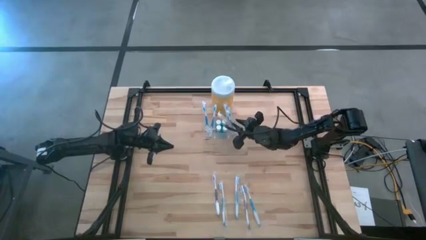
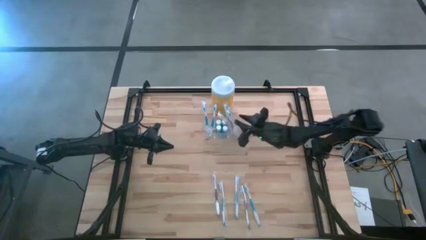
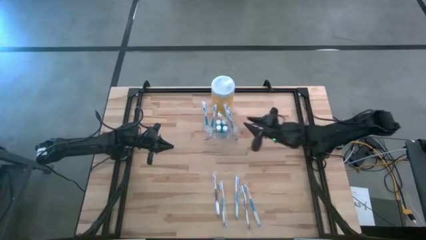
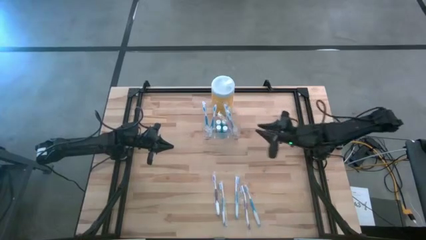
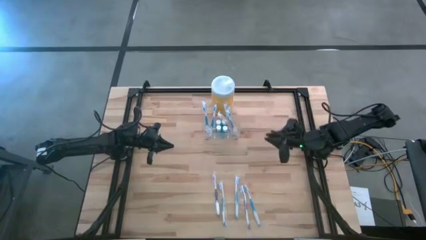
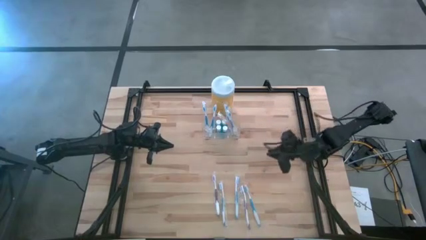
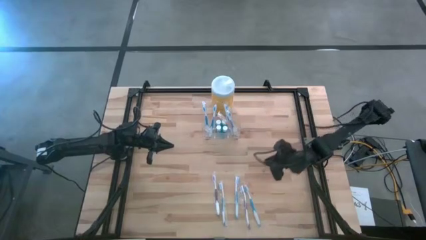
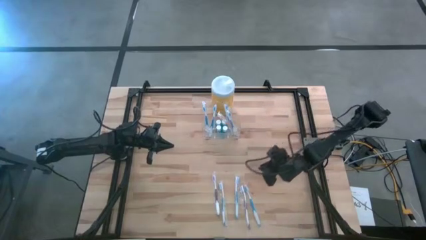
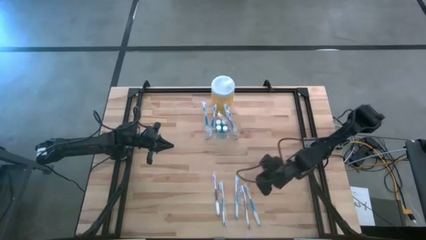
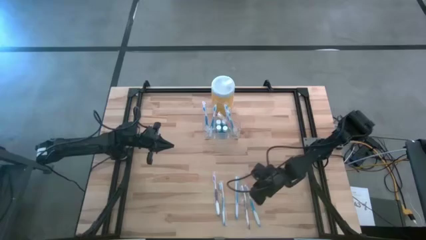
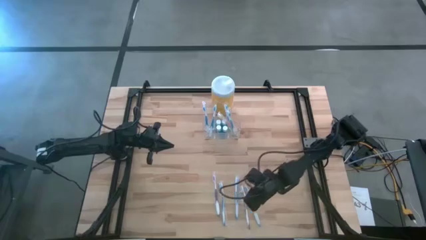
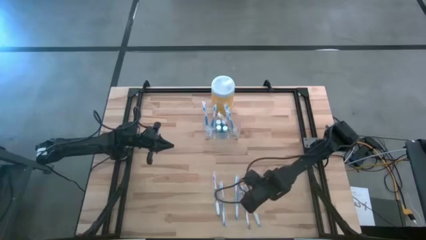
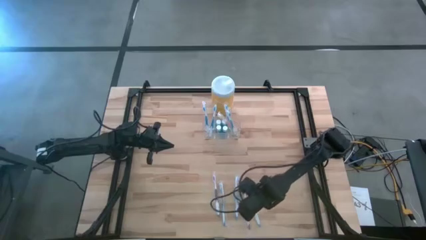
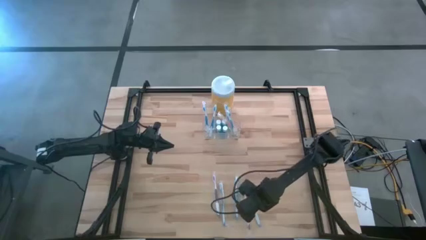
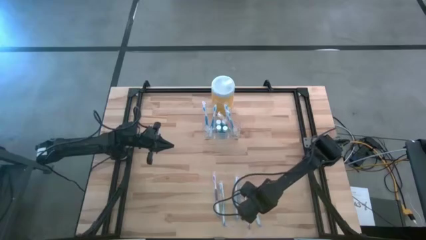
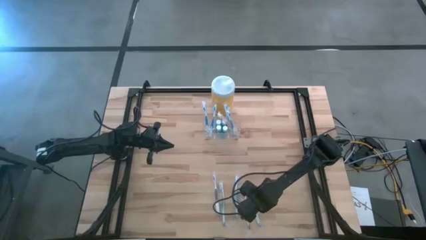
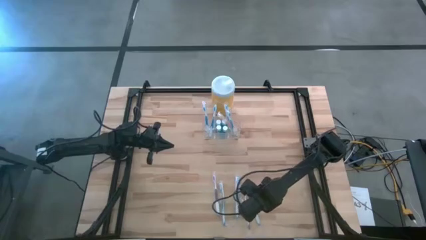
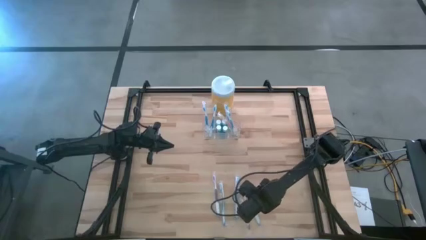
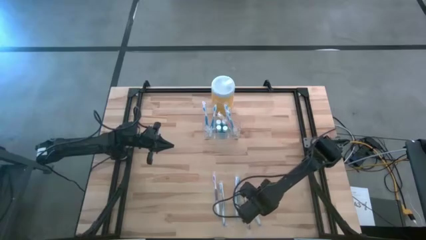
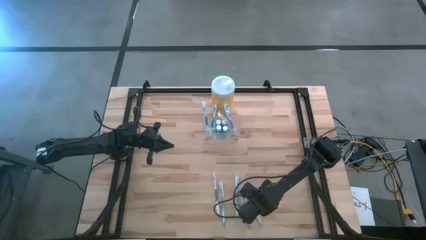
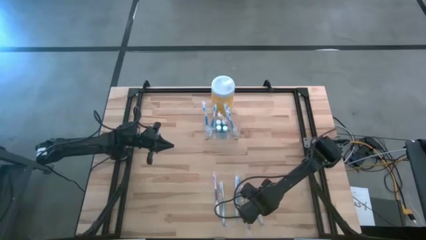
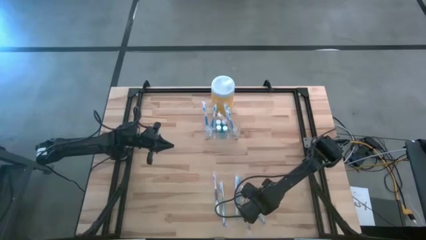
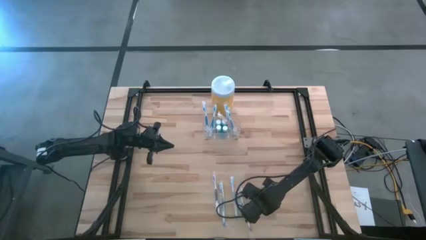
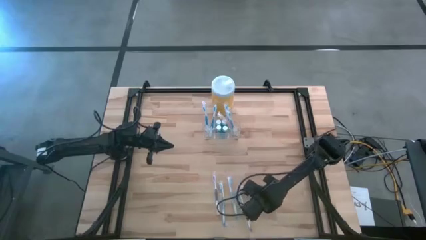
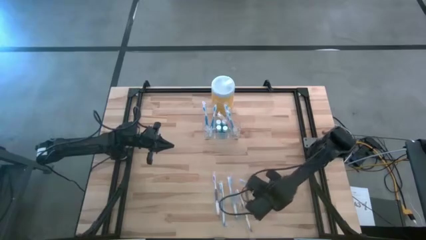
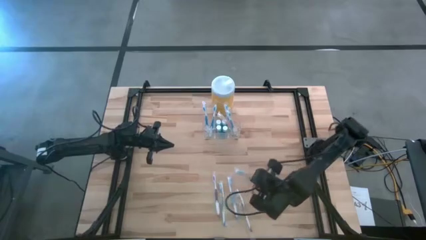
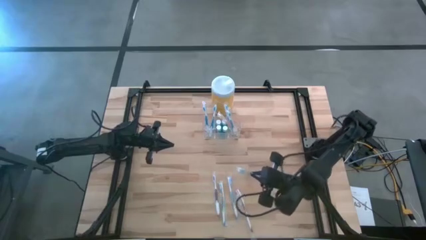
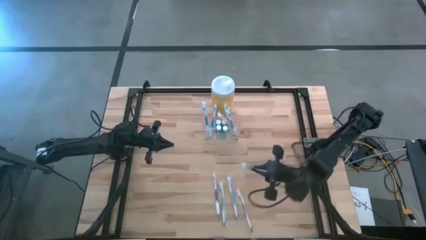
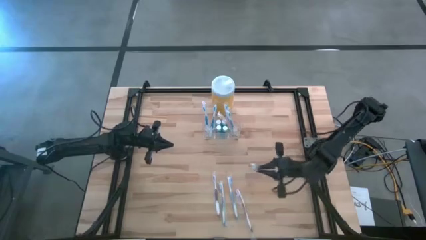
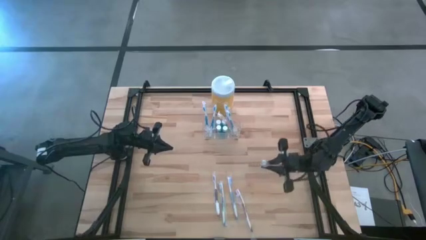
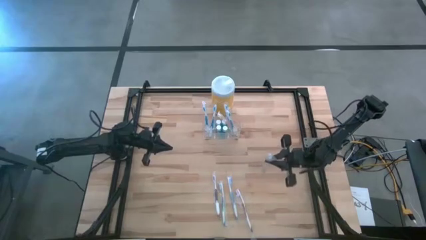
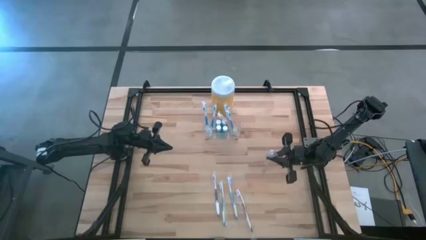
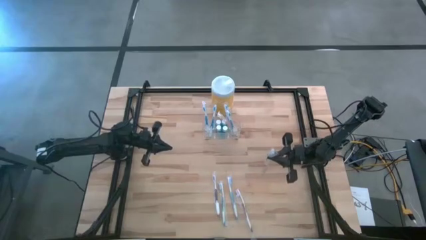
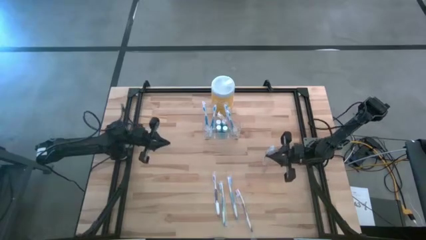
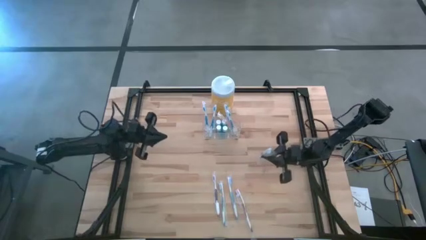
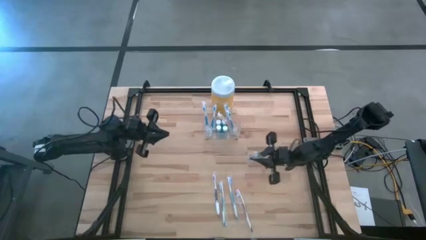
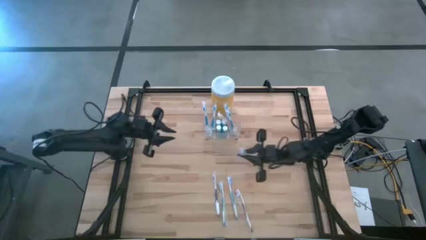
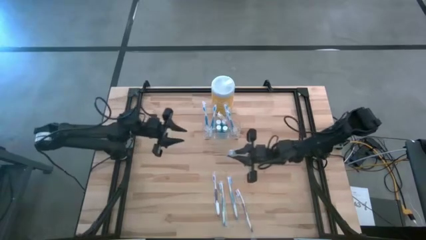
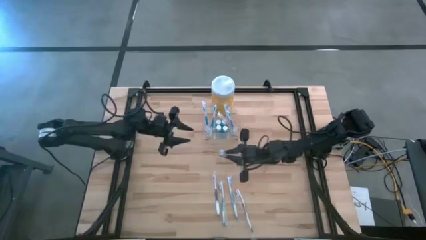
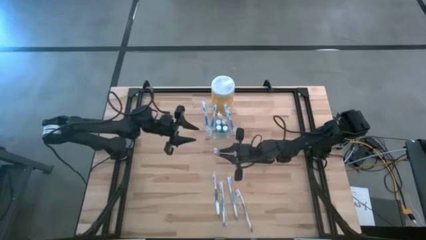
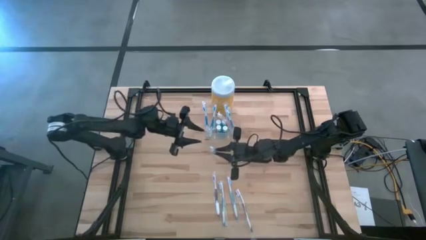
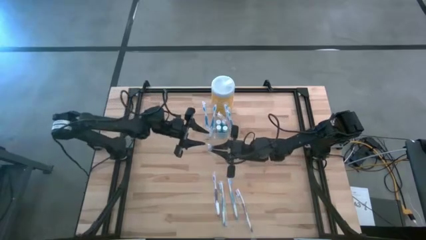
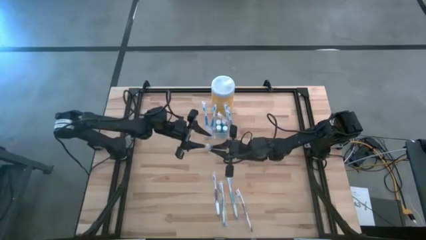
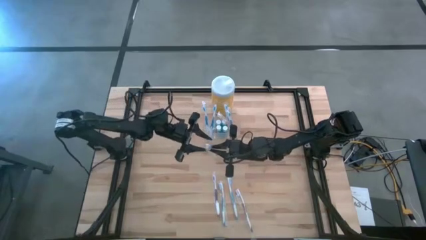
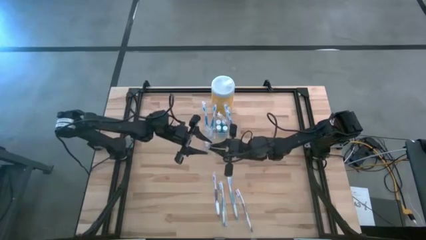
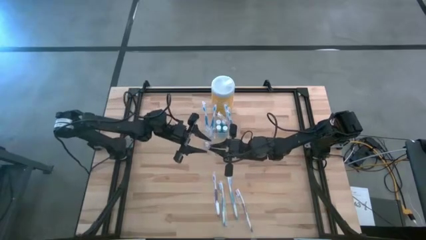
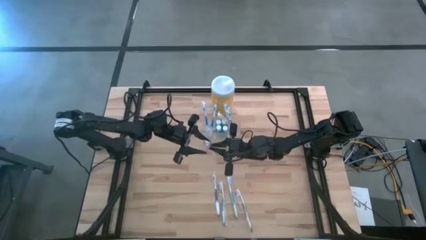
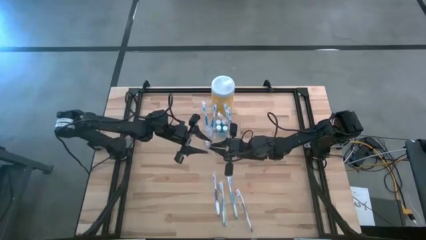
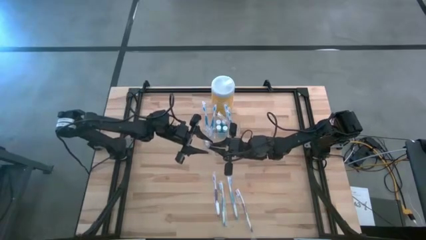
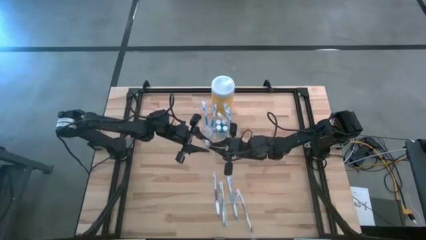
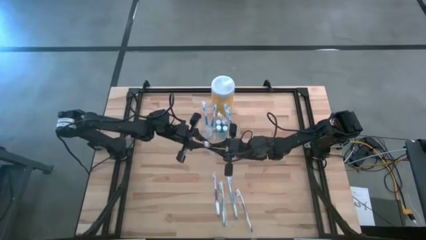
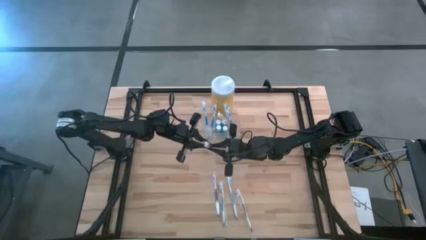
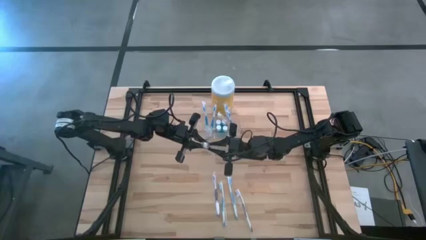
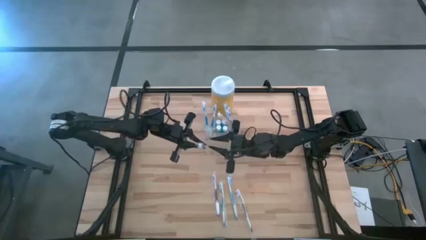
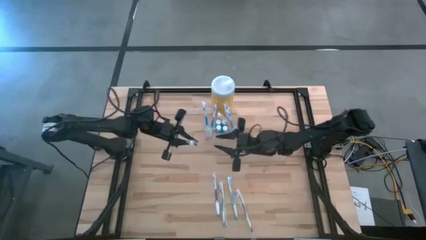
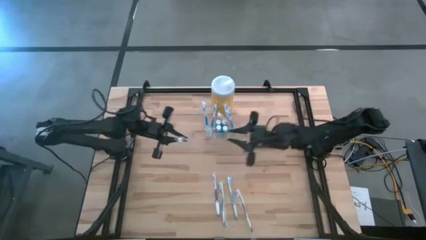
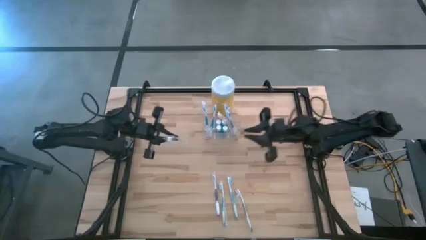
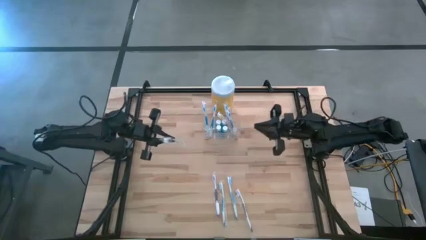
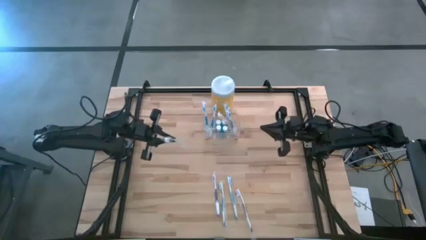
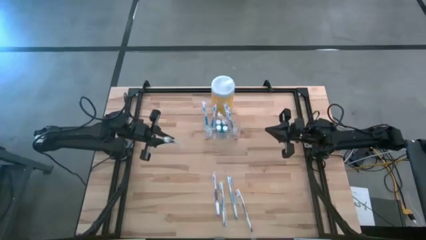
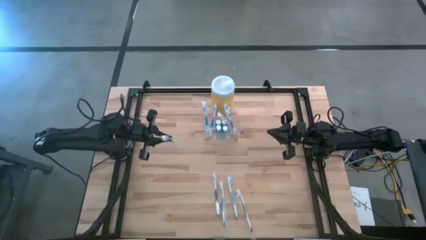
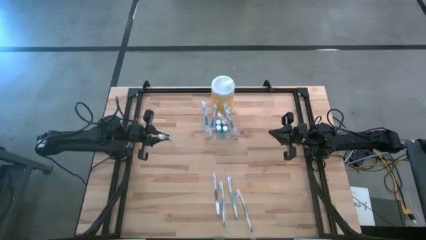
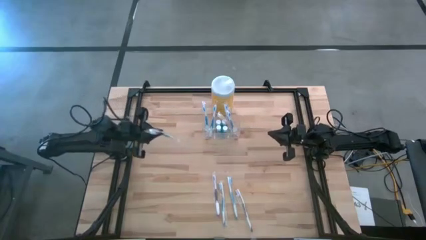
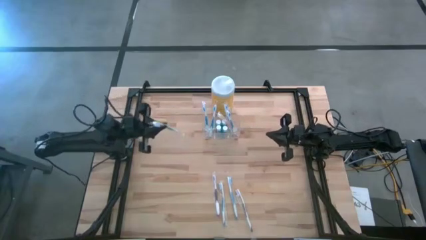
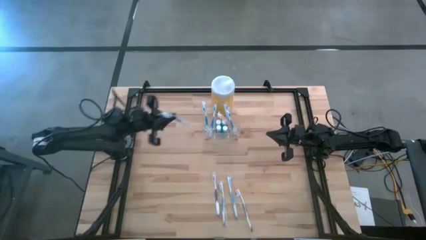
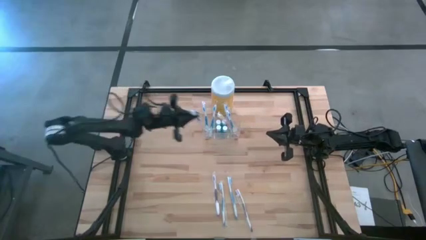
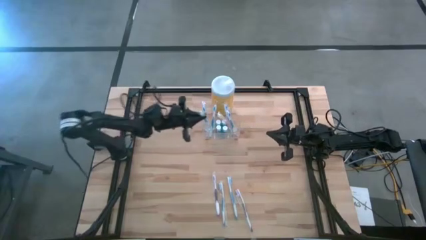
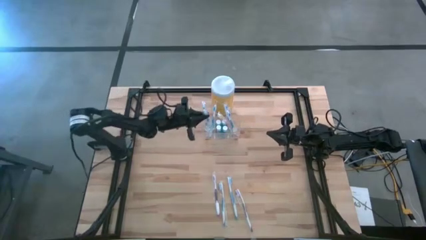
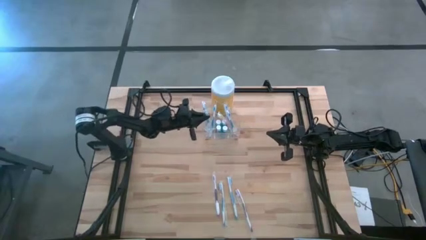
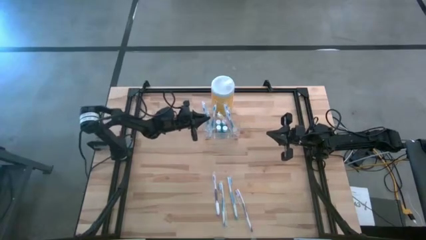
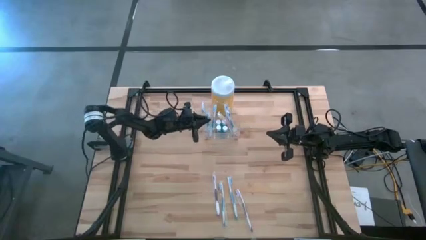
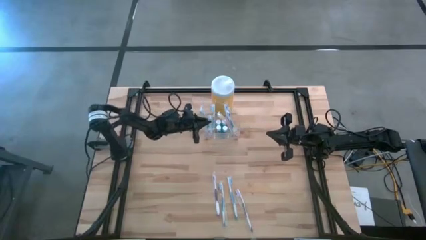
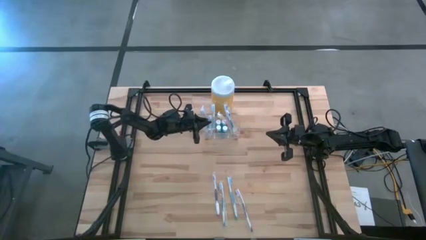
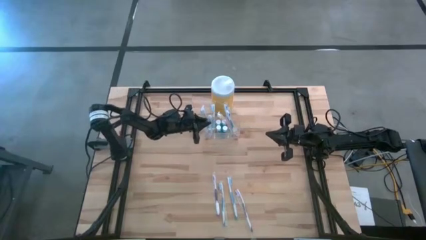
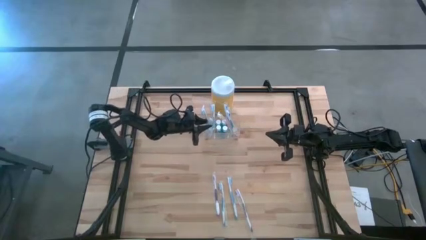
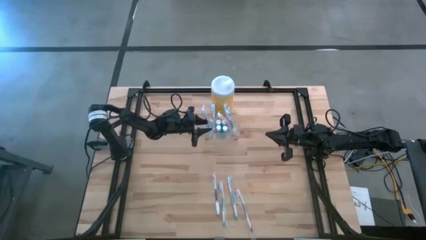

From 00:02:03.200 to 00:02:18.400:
Task: Pick & Place toothbrushing station
Put the blue toothbrush into the transparent organizer
